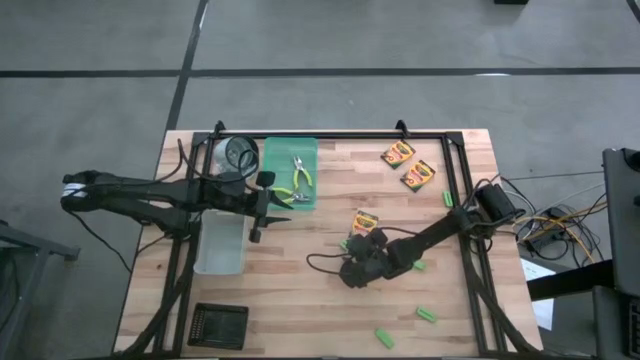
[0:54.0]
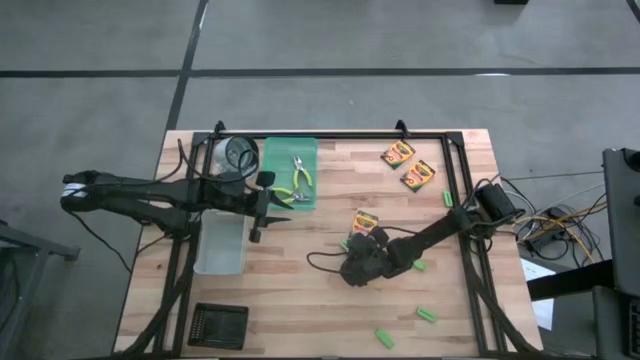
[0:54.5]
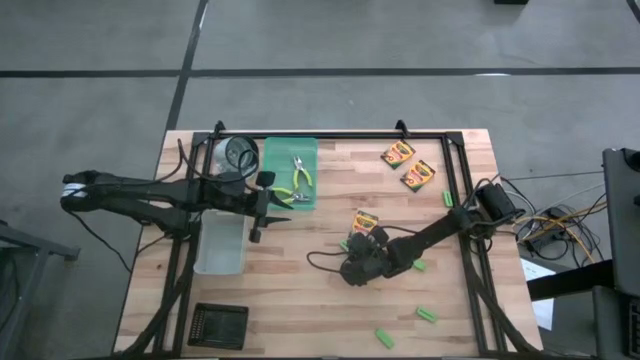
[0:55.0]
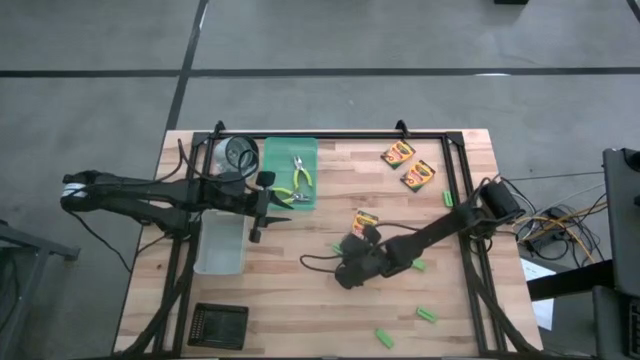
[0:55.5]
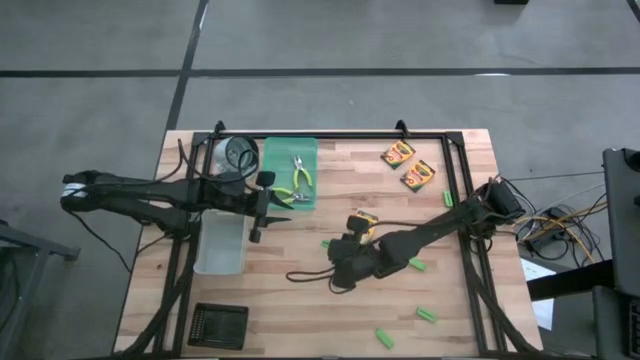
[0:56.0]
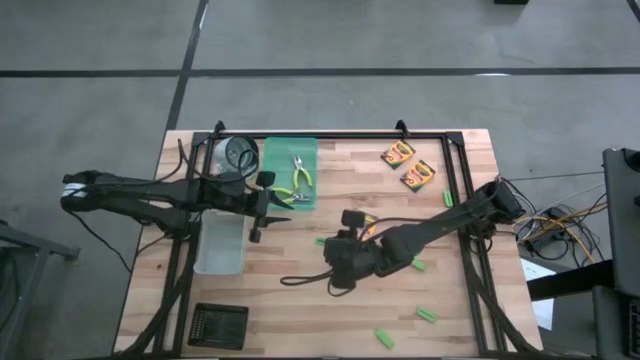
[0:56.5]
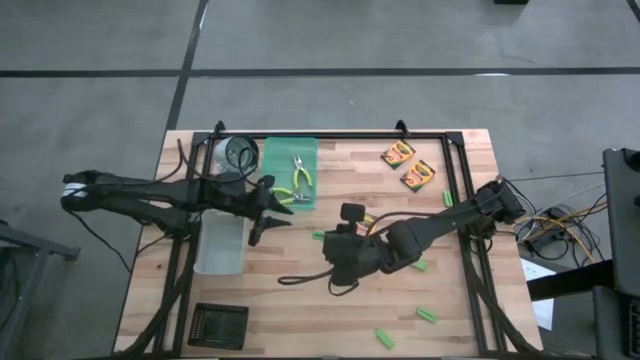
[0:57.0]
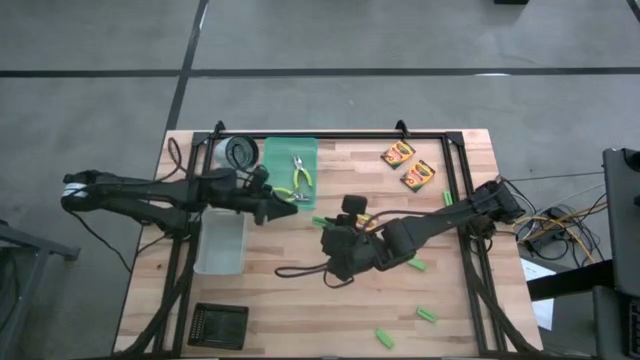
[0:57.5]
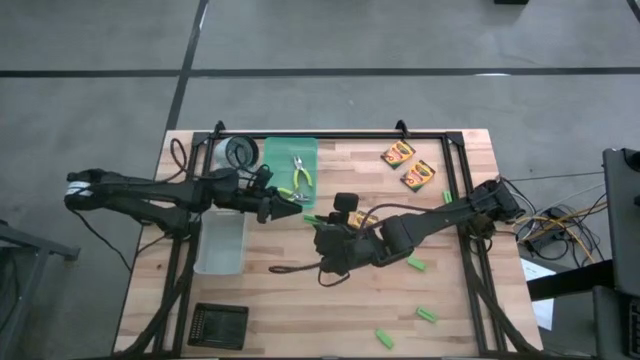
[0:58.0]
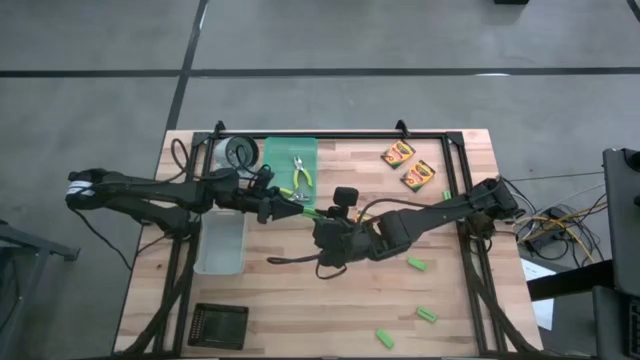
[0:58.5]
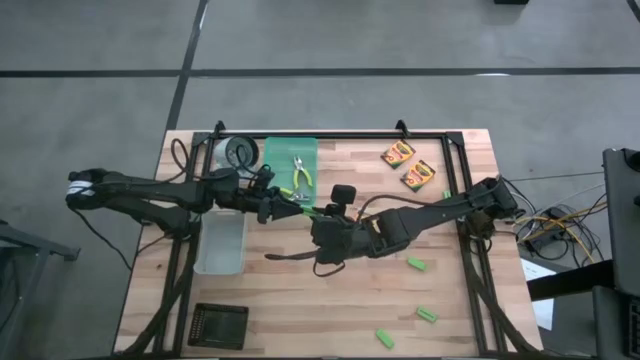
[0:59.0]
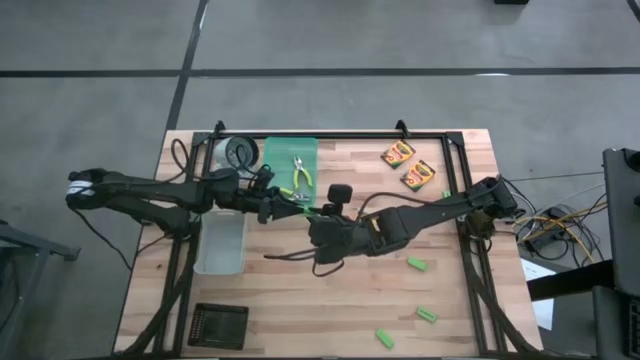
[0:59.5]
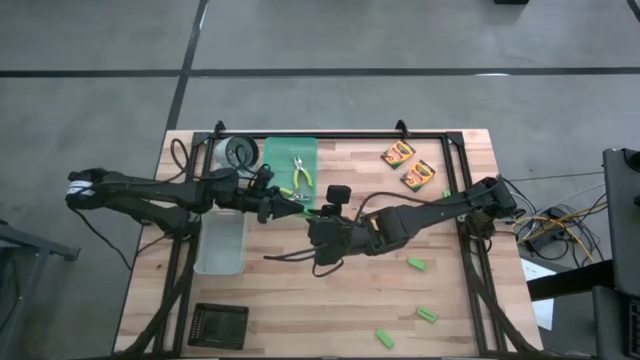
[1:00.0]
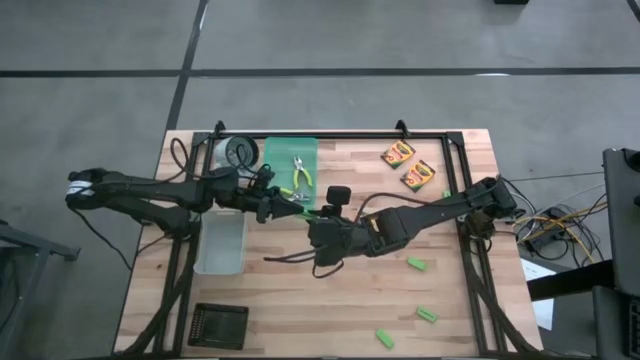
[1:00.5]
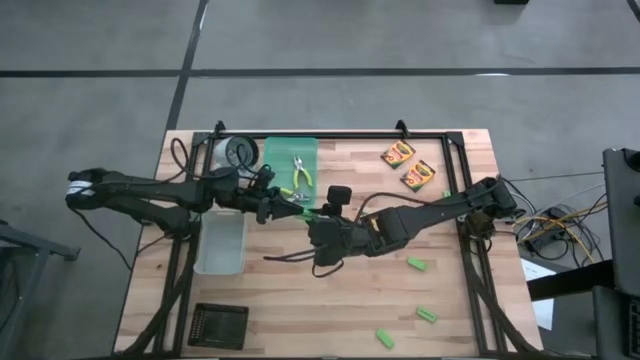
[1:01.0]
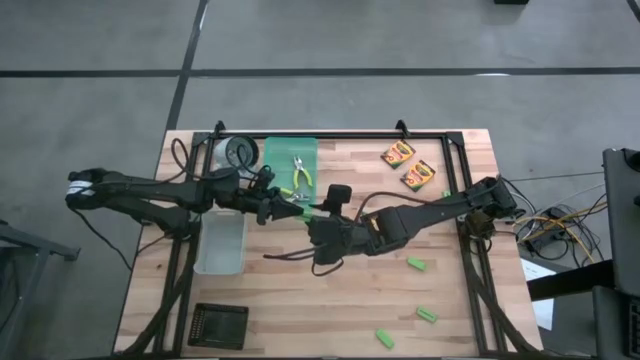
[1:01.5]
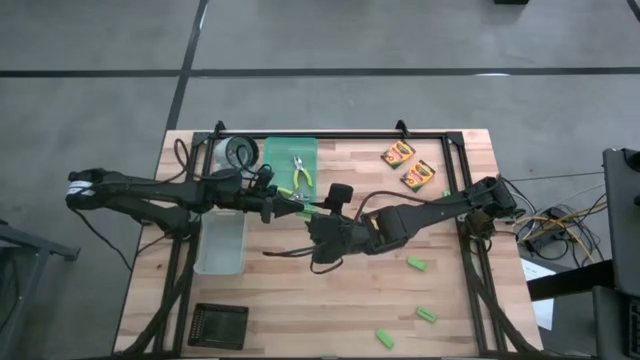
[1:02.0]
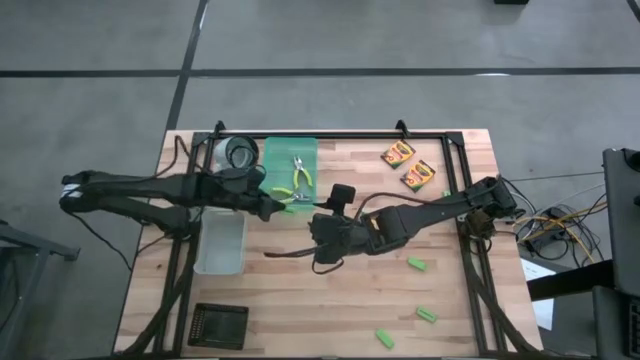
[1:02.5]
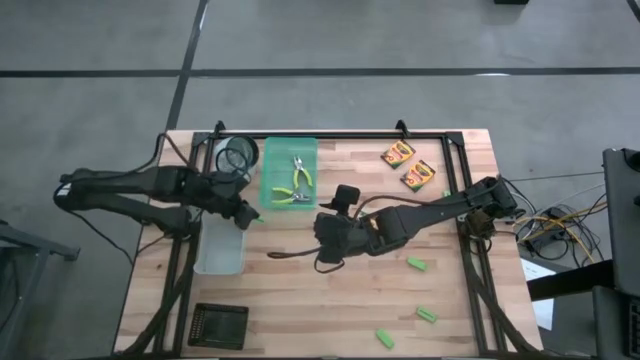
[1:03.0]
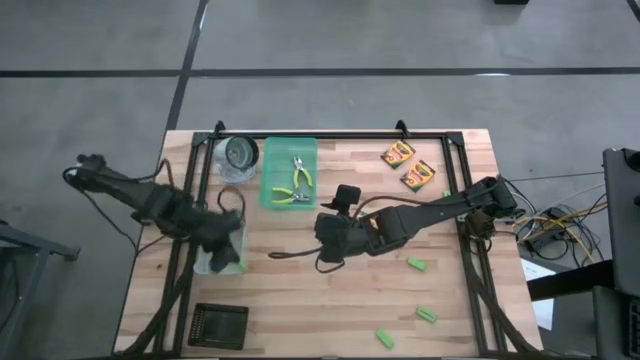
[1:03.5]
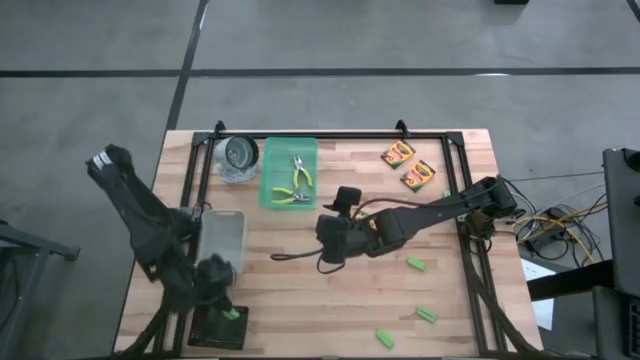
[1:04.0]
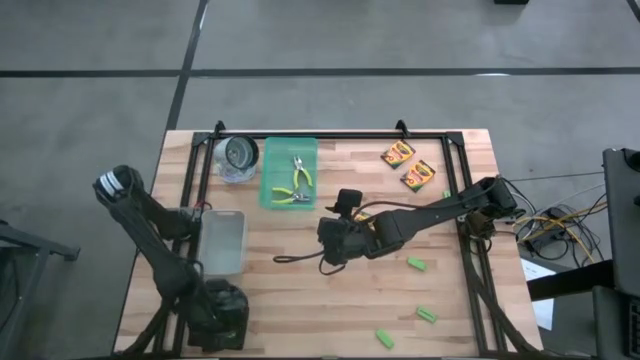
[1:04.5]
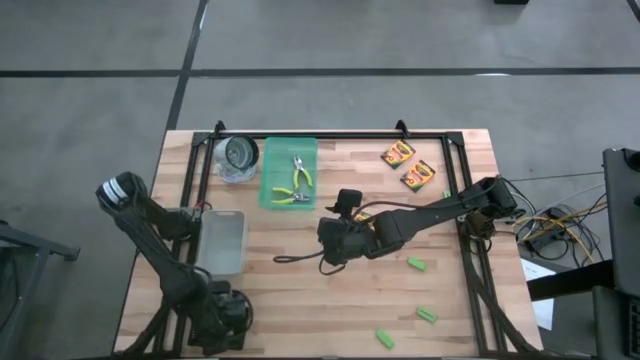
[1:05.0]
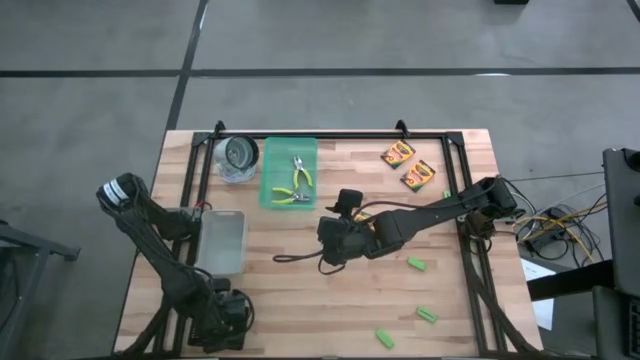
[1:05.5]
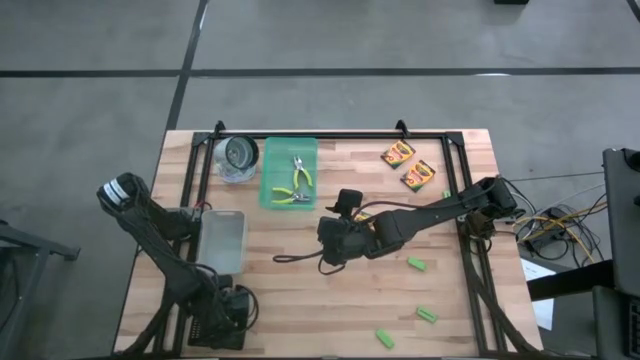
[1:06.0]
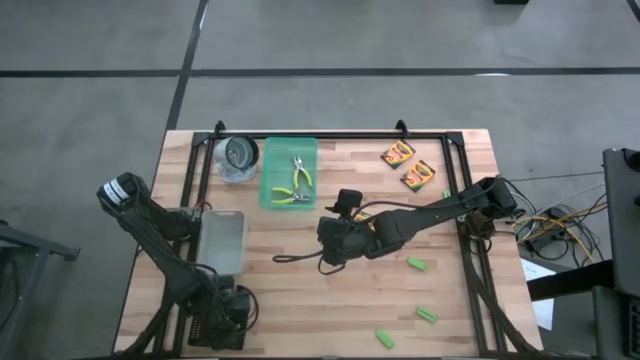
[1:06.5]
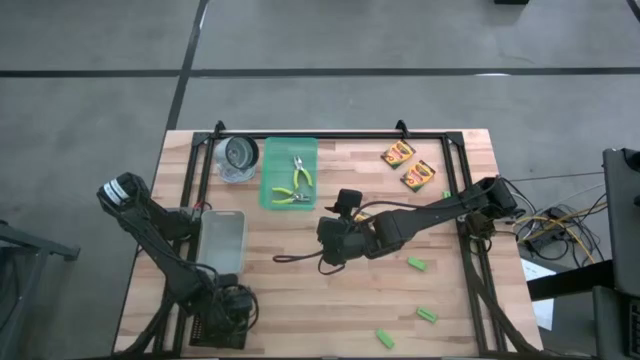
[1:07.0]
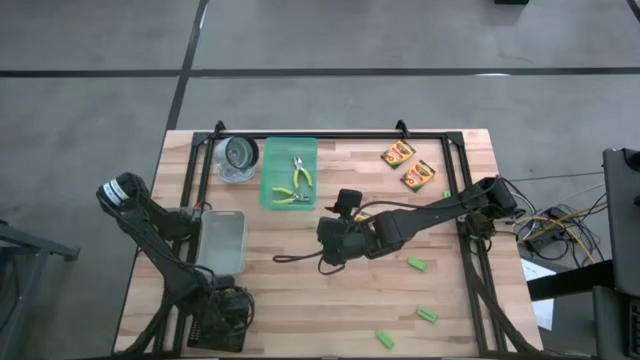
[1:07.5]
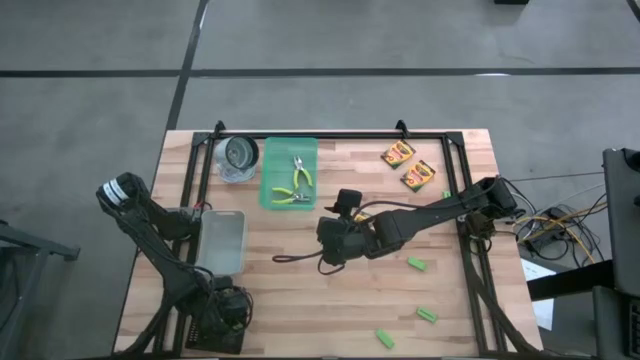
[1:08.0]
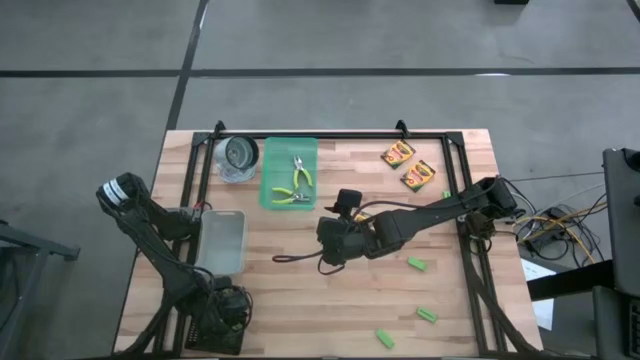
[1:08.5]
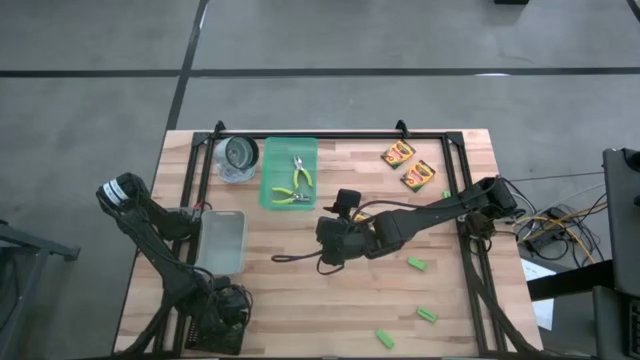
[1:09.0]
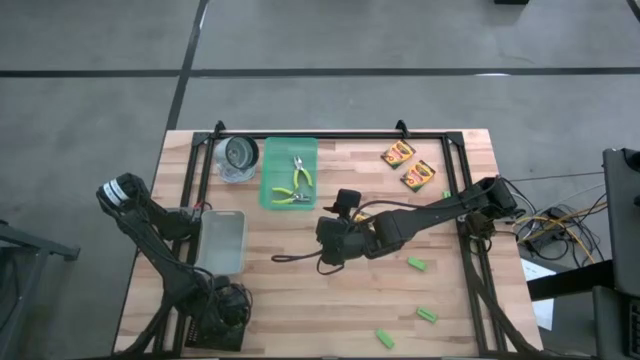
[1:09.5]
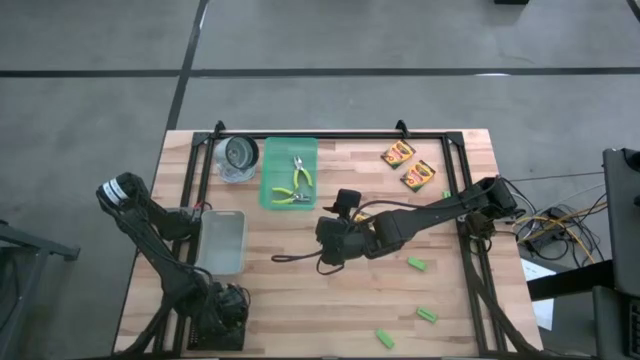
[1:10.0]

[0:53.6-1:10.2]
Task: Pick & Place School Supplies
Put the green eraser into the black bin

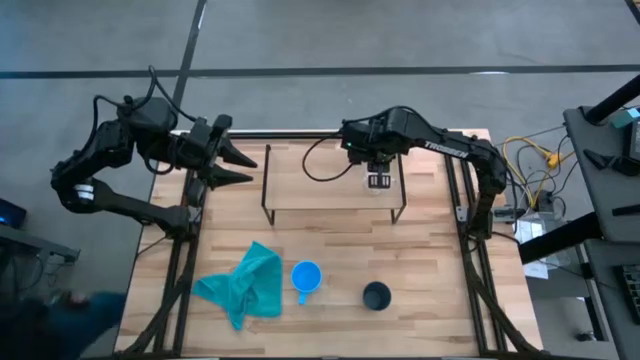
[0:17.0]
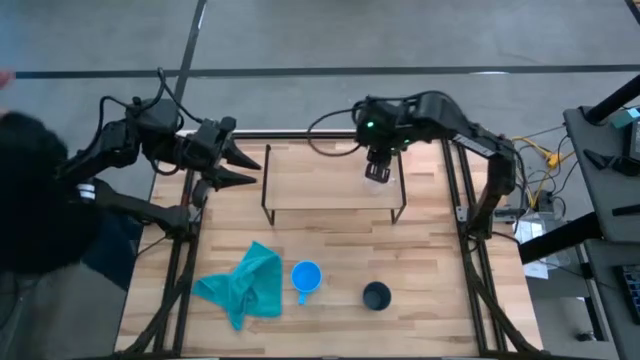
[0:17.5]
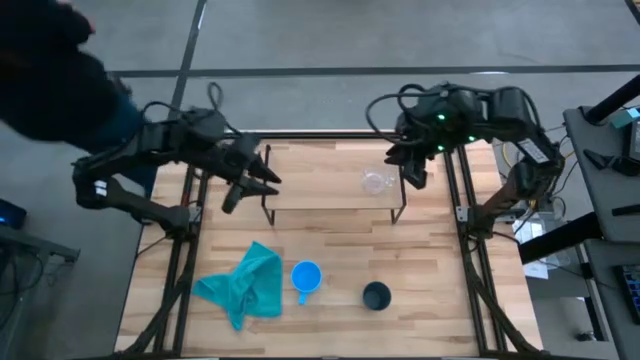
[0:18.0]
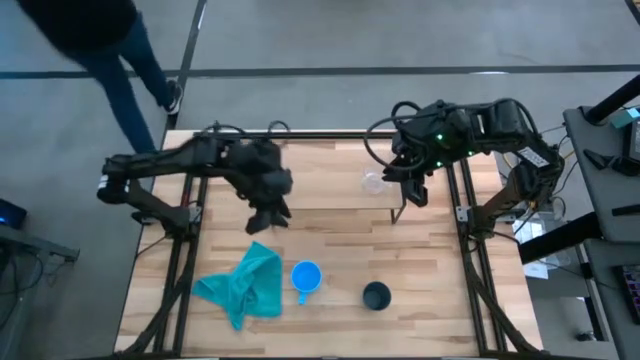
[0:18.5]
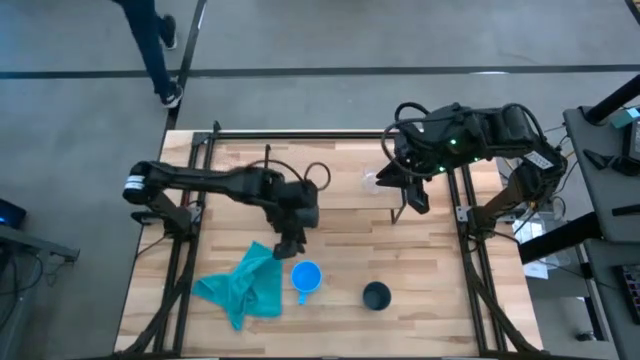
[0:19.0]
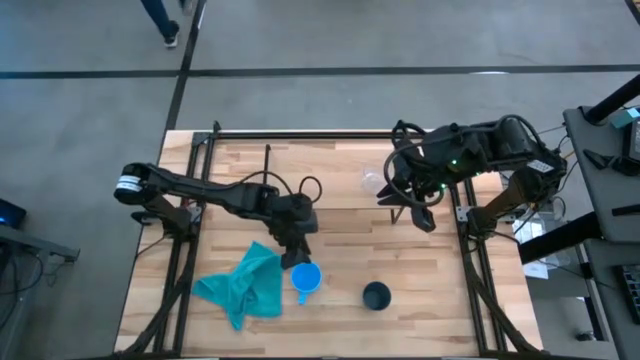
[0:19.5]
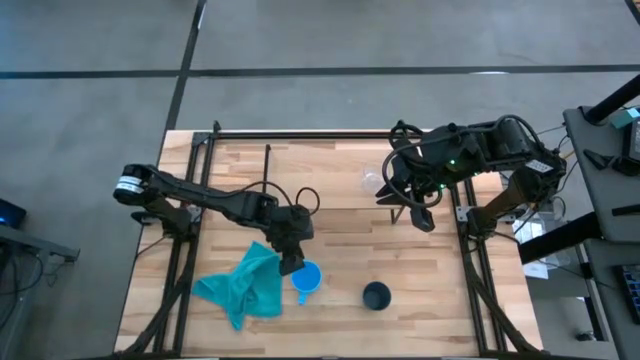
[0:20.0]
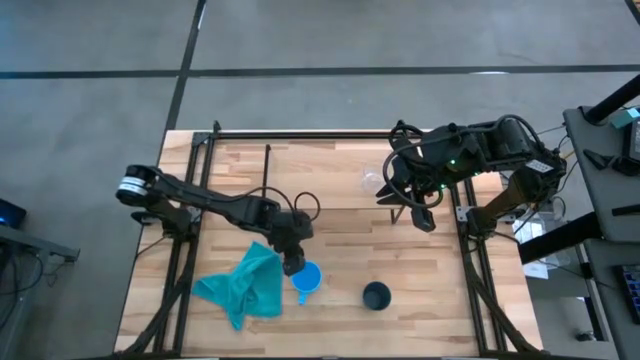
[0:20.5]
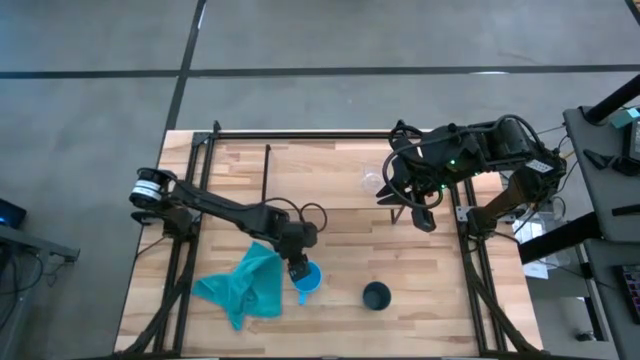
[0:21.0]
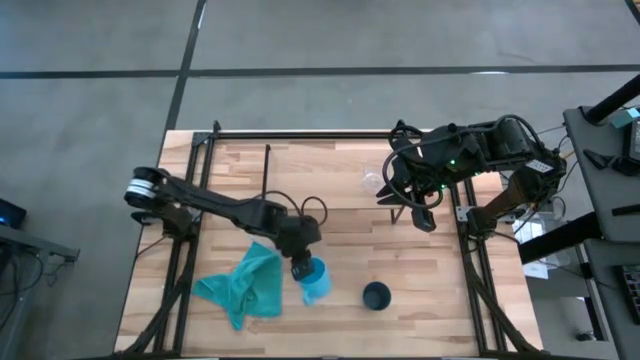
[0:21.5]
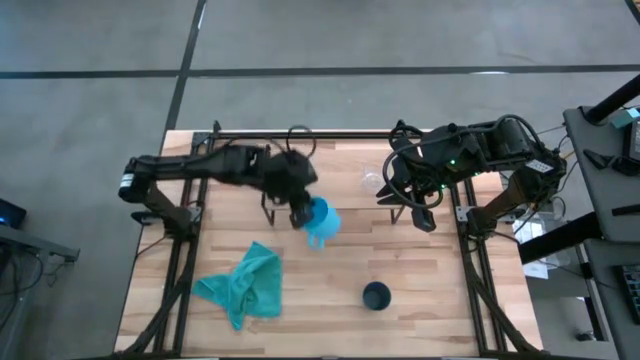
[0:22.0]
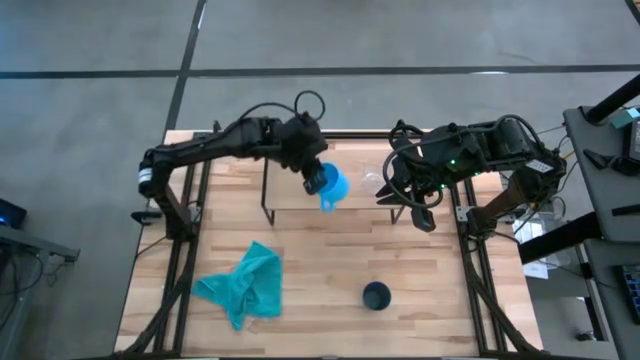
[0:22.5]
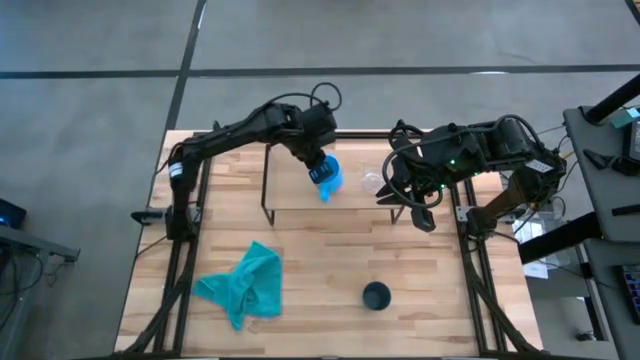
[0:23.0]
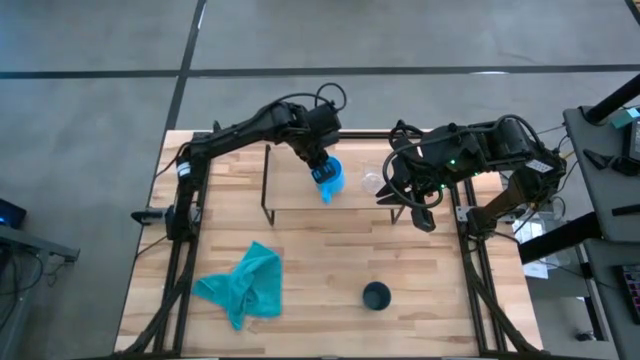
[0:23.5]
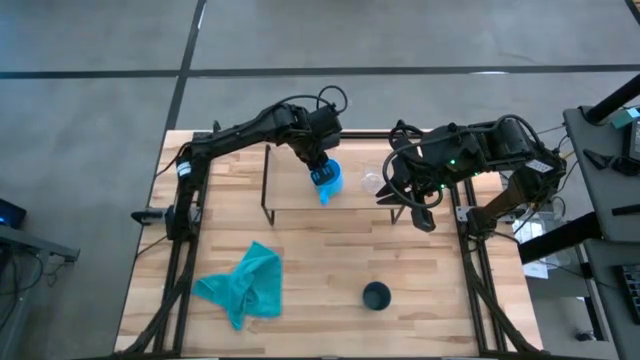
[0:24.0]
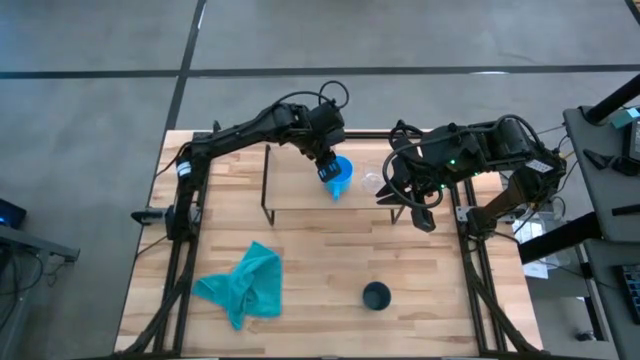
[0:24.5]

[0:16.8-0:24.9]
Task: Stack small to large cups/mugs on shelf
Put the blue mug on the shelf
